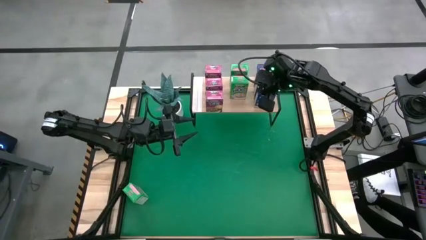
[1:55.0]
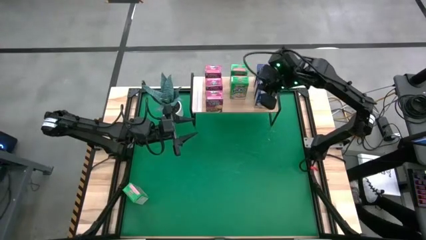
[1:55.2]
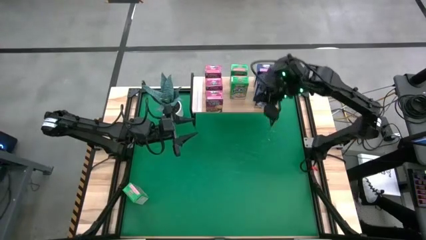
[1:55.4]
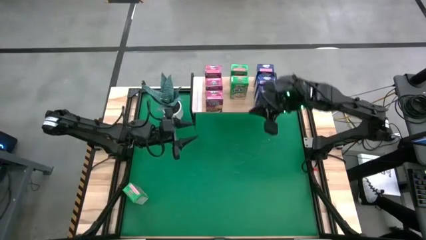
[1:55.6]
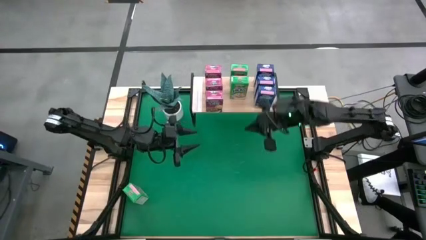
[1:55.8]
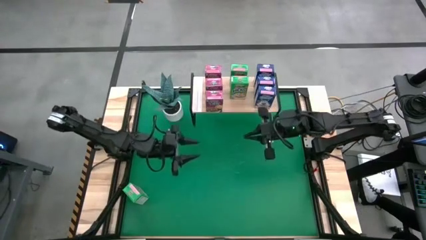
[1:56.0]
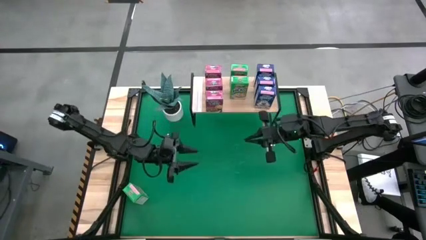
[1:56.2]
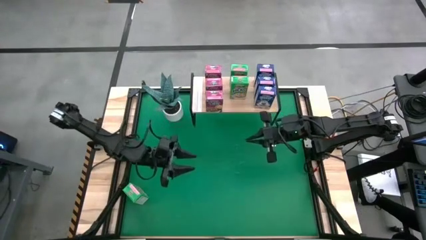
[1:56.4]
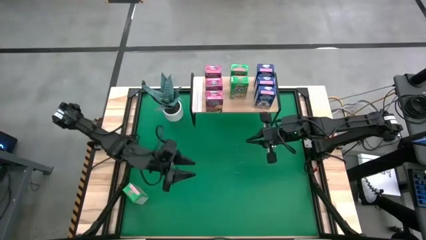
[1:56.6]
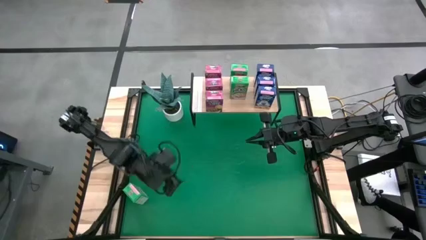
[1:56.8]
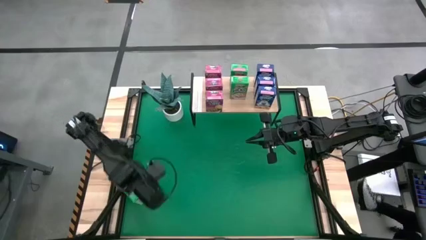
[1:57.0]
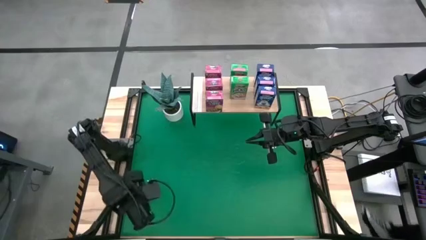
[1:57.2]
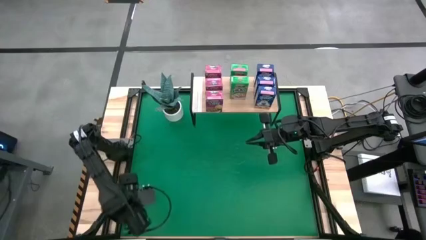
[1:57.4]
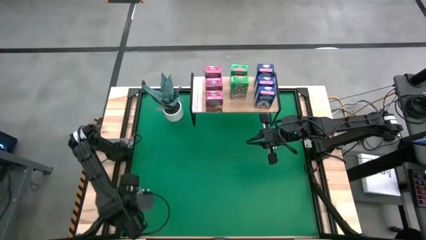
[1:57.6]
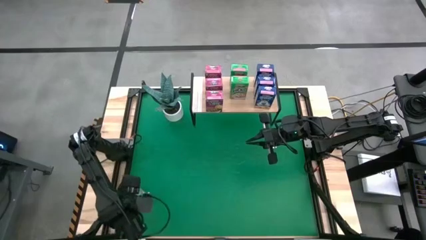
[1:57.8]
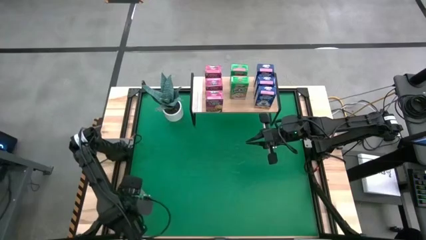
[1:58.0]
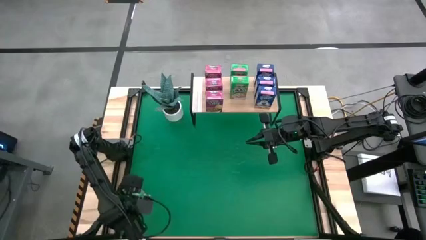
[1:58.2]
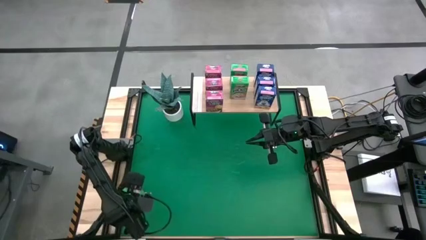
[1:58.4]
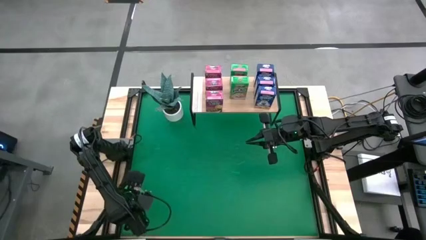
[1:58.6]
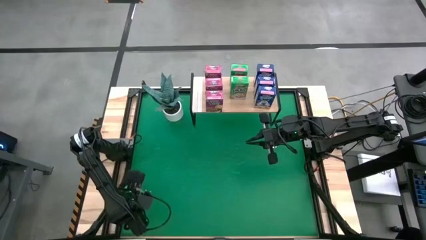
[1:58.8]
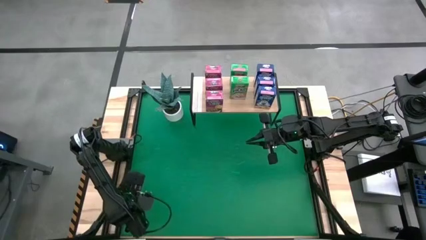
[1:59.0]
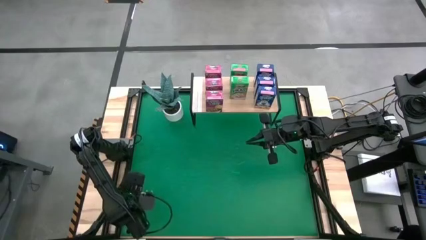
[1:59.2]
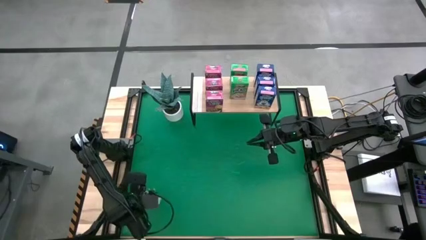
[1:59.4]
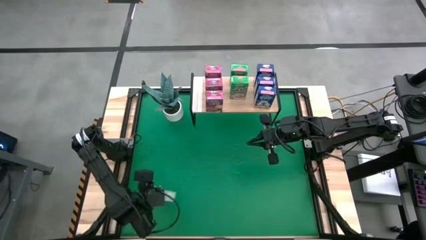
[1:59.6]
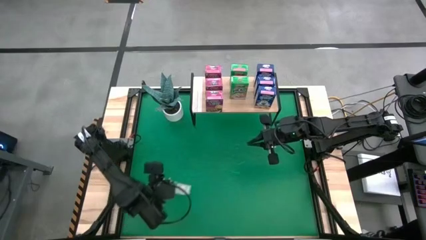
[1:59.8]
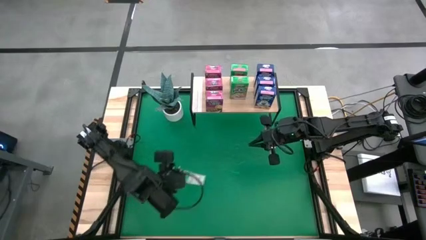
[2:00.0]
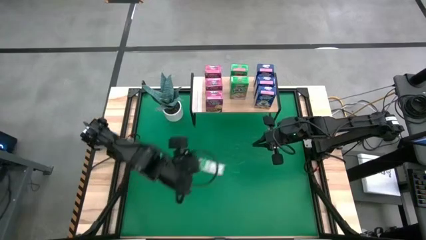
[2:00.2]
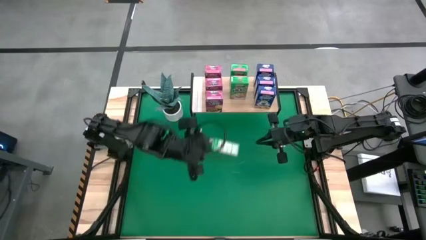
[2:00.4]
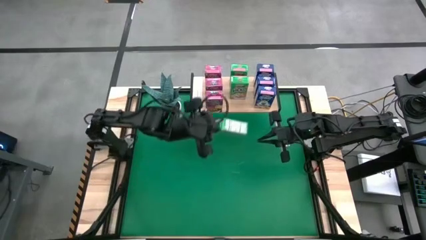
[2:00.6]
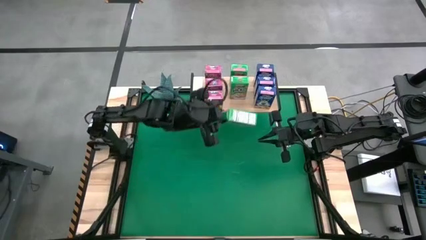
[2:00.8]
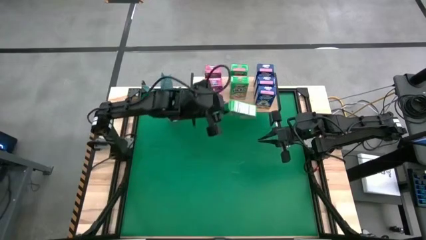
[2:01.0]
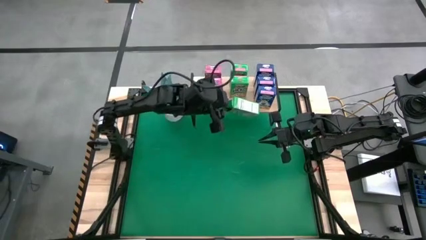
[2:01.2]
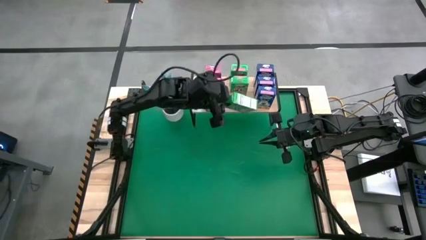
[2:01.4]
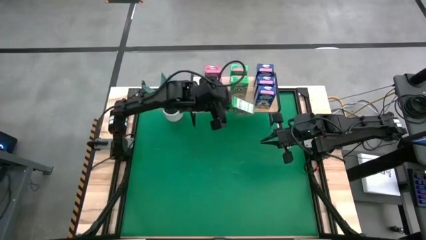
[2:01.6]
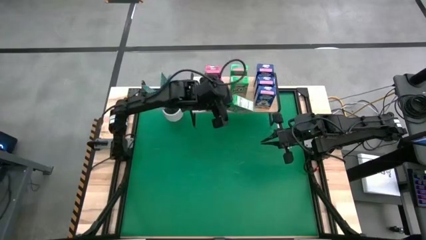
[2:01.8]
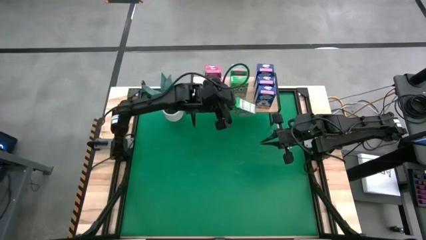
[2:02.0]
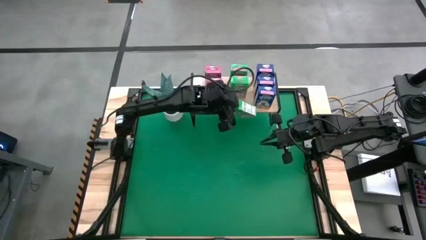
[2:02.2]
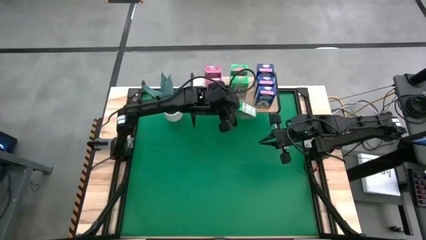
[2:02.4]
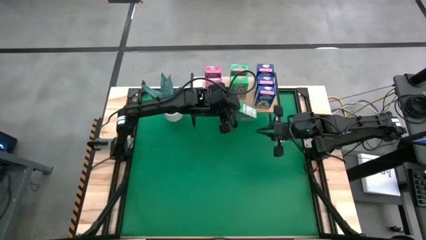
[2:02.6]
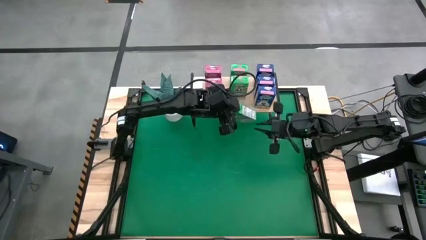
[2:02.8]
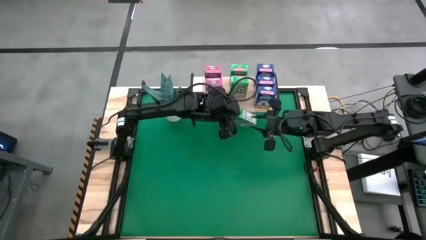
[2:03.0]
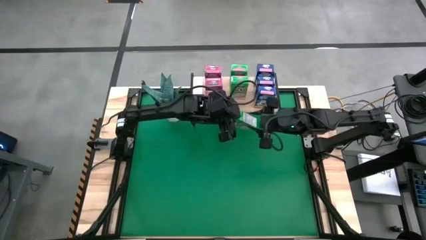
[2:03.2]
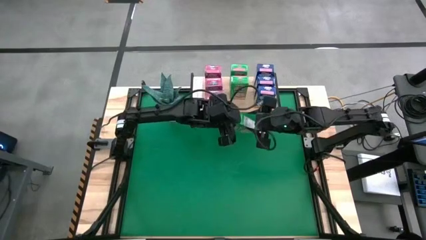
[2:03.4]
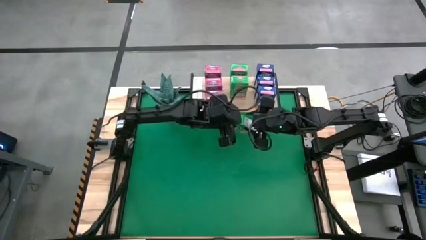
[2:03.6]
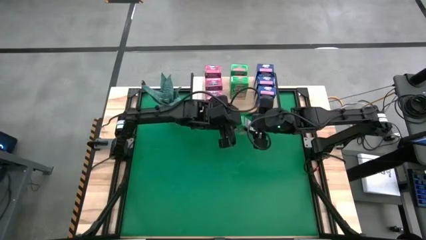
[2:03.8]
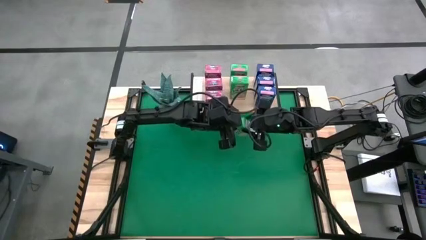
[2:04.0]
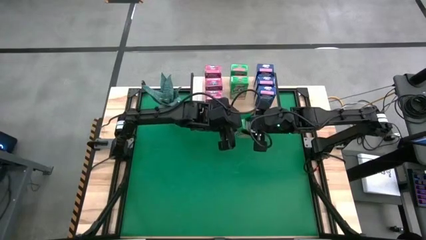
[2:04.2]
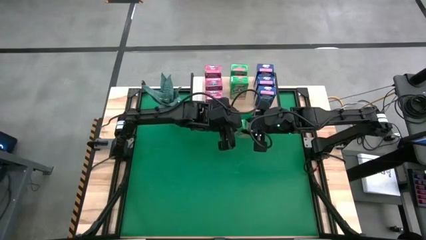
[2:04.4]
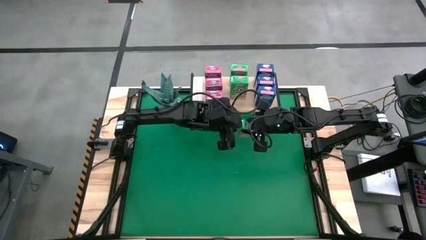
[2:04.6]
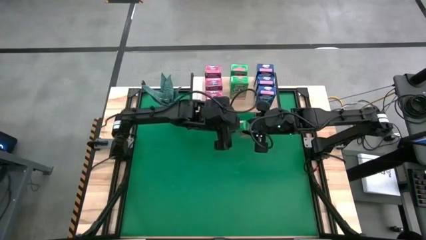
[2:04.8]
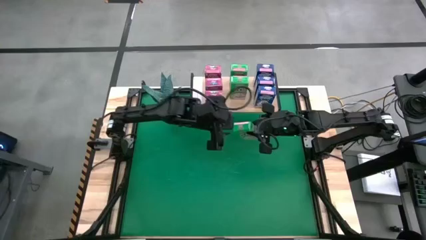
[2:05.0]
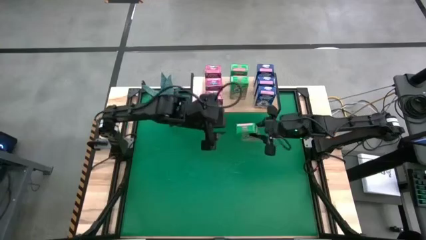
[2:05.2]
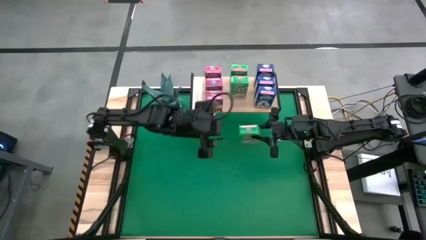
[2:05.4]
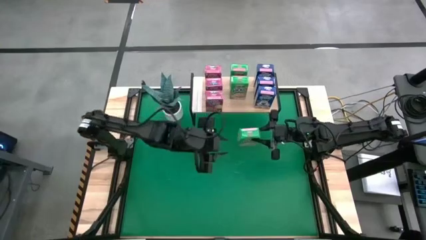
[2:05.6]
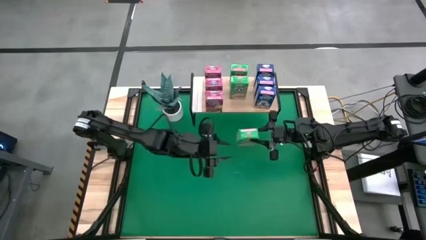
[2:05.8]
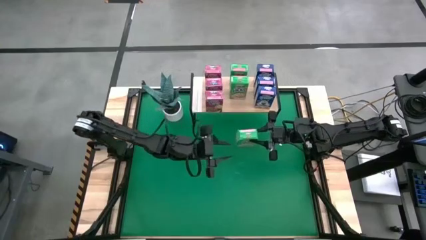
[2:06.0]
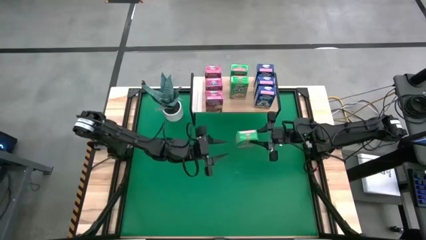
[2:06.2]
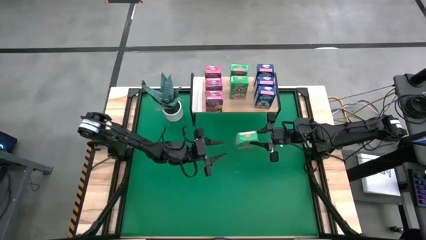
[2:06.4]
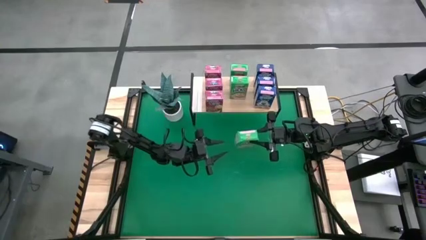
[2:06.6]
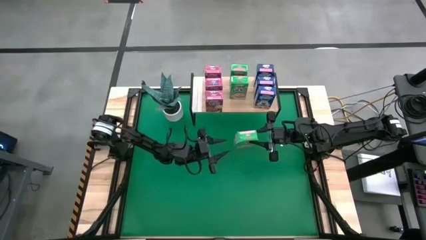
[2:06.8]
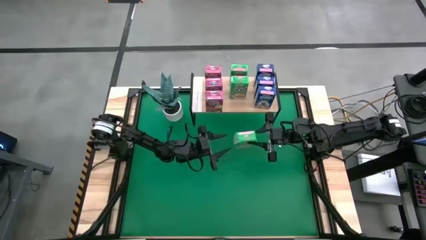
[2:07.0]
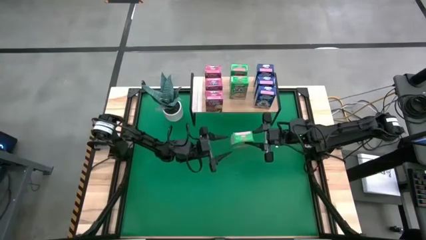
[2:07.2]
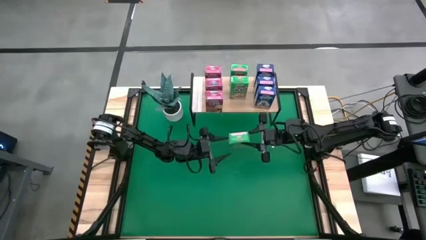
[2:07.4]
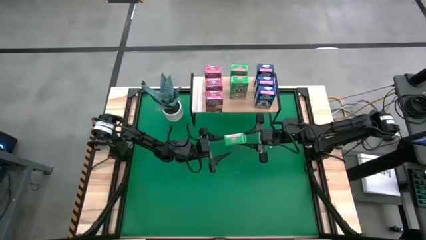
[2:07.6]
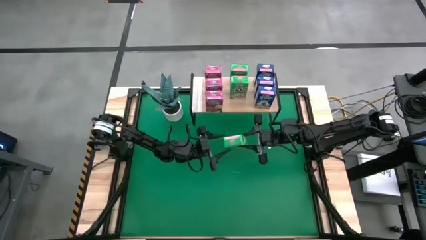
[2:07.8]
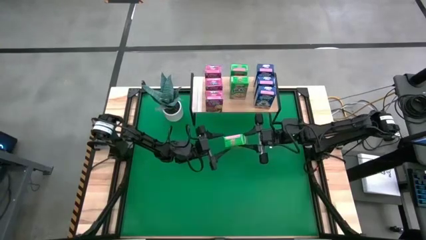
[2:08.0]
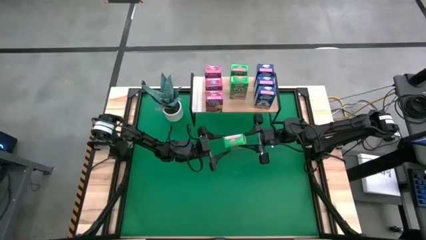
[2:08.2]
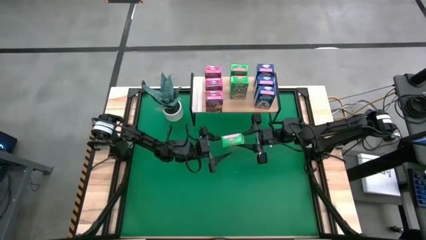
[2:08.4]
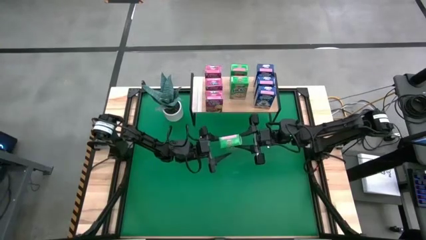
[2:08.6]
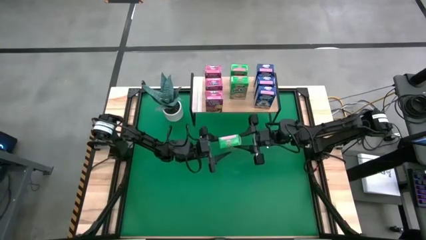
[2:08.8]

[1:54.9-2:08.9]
Task: Stack cereal on shelf
Put the green cereal box aligned with the other green cereal boxes on the shelf
